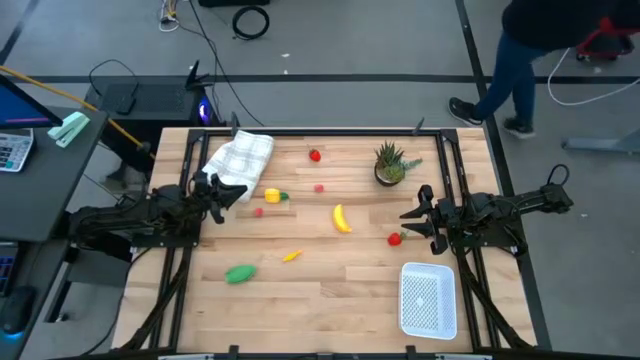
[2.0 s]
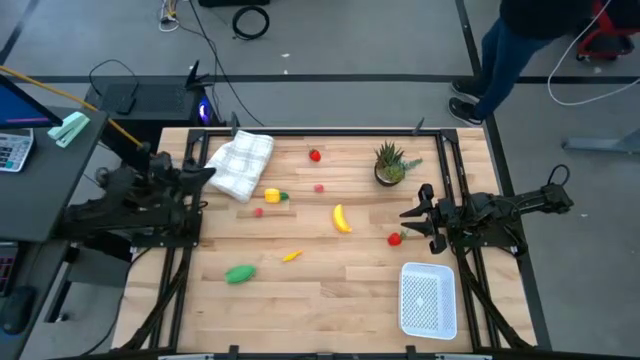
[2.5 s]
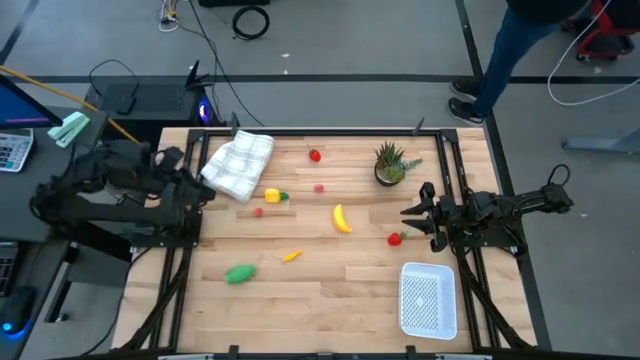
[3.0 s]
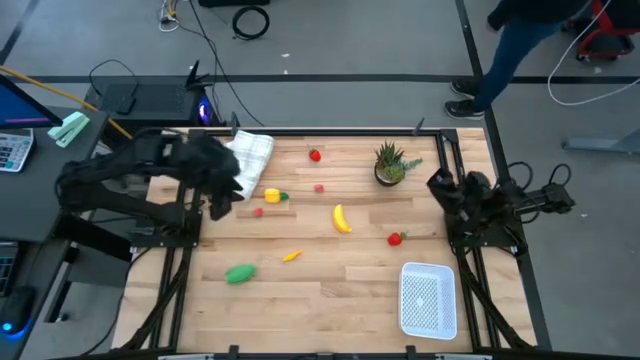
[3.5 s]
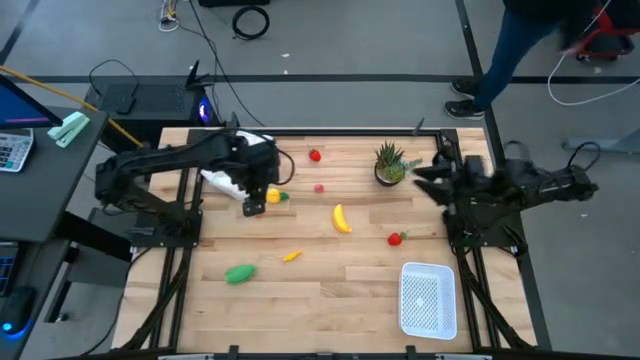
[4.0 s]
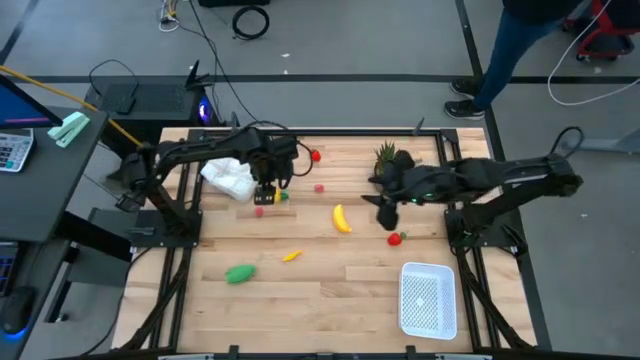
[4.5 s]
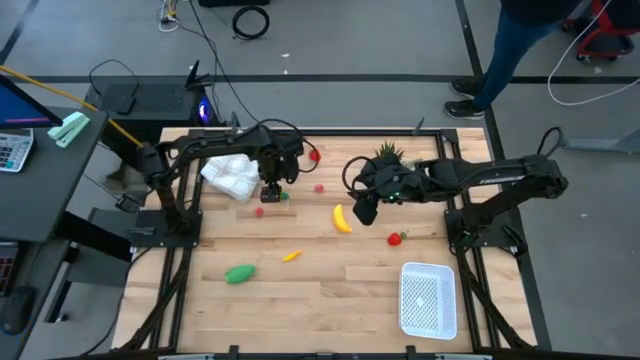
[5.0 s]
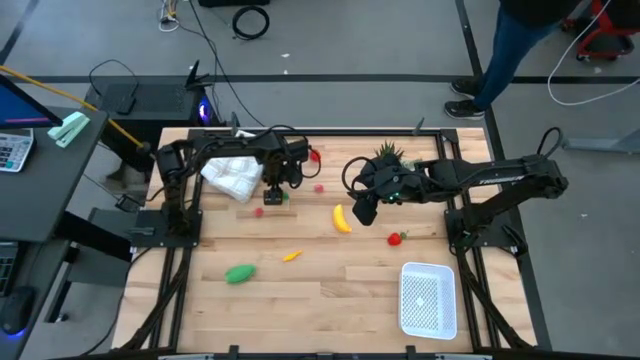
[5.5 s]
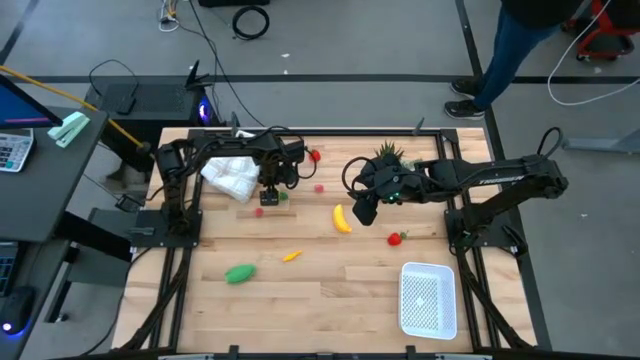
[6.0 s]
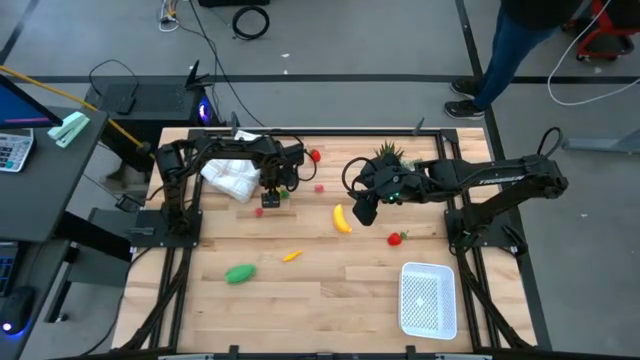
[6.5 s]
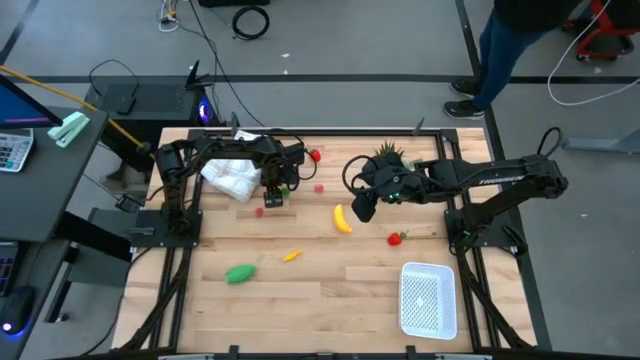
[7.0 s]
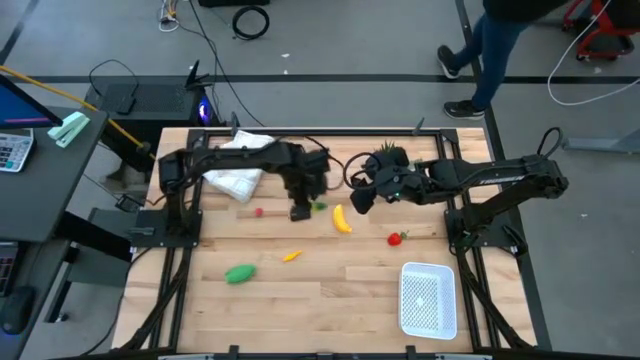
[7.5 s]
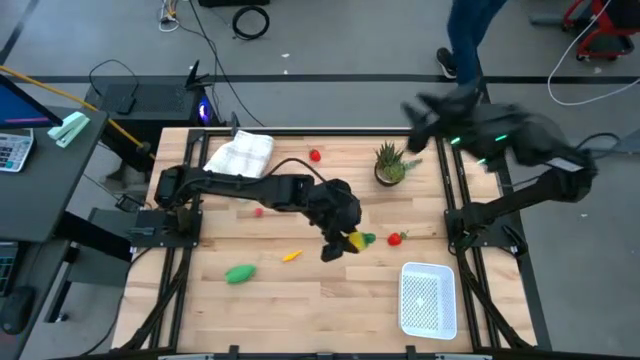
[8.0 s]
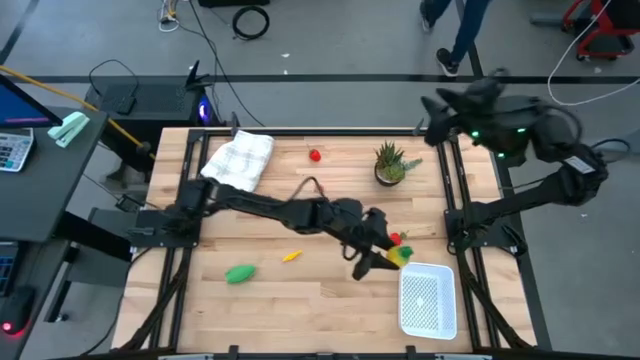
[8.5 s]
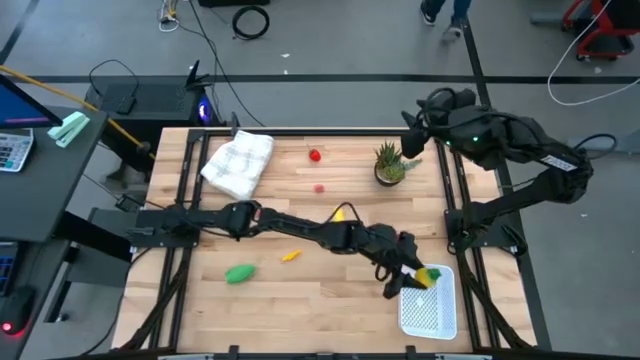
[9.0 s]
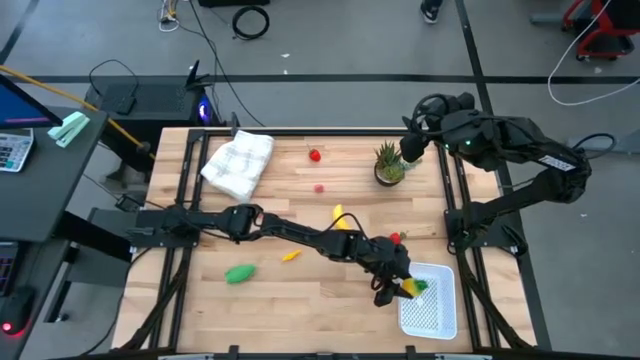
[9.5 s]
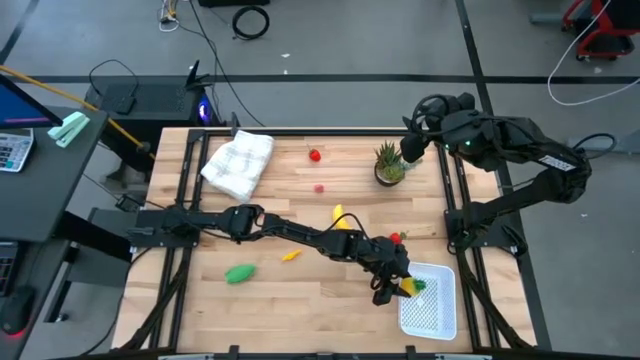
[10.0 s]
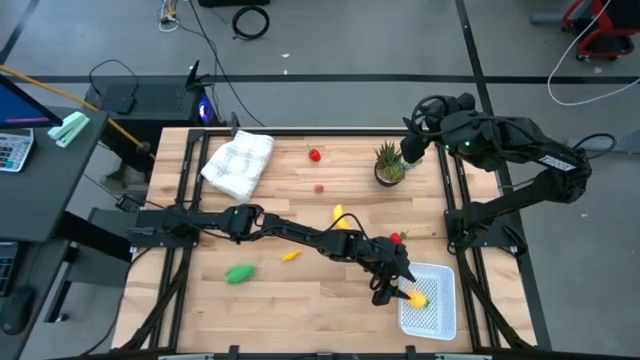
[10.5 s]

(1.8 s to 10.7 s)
Task: Pick and placing Produce into tupperware
Put the pineapple into the white bin

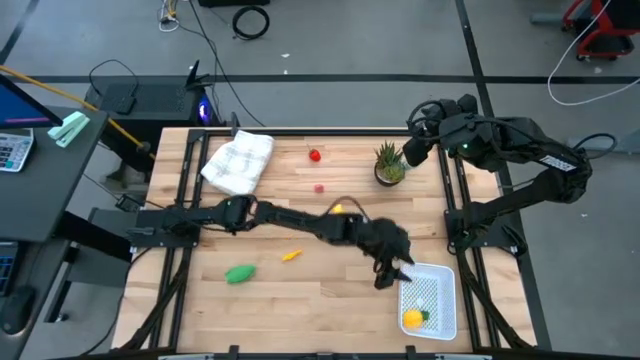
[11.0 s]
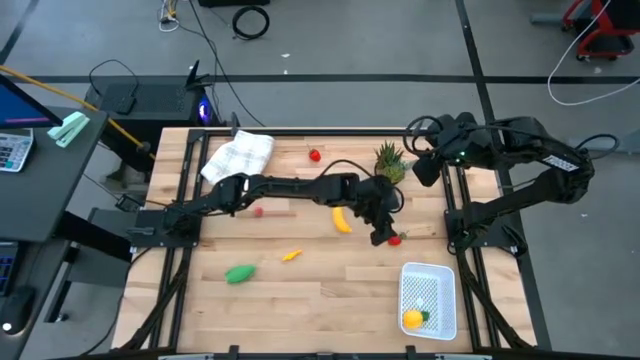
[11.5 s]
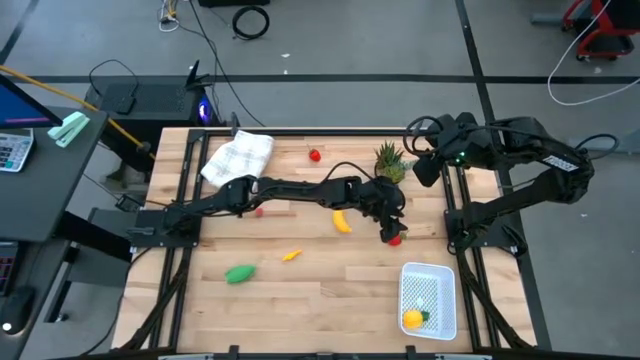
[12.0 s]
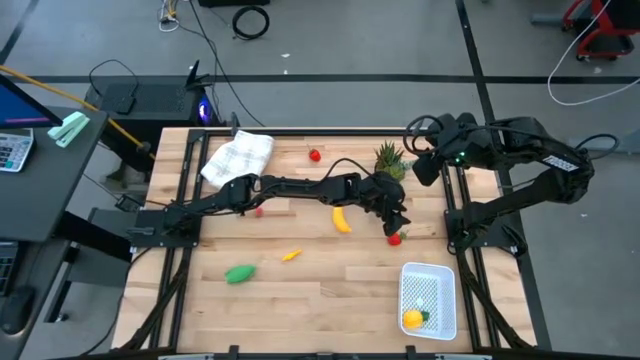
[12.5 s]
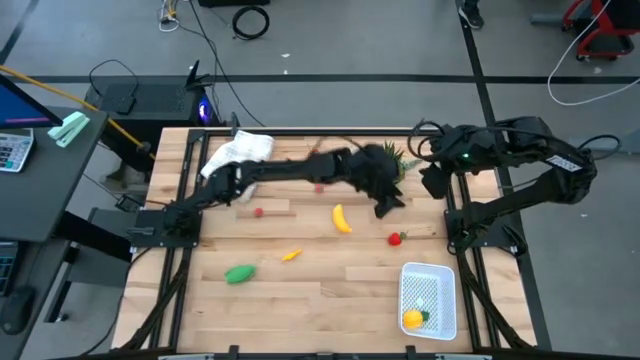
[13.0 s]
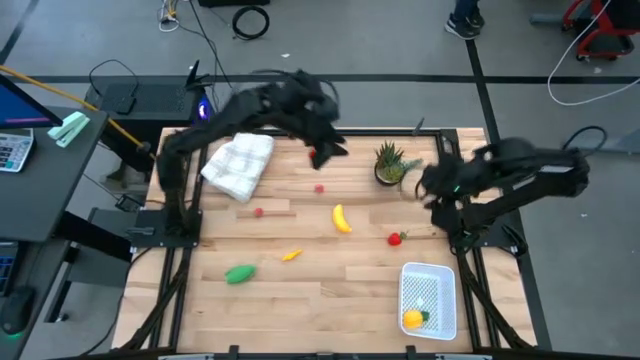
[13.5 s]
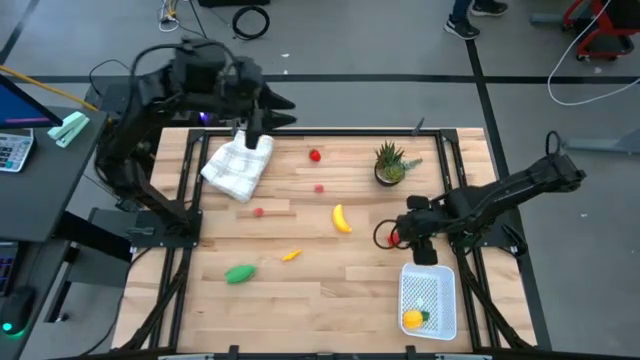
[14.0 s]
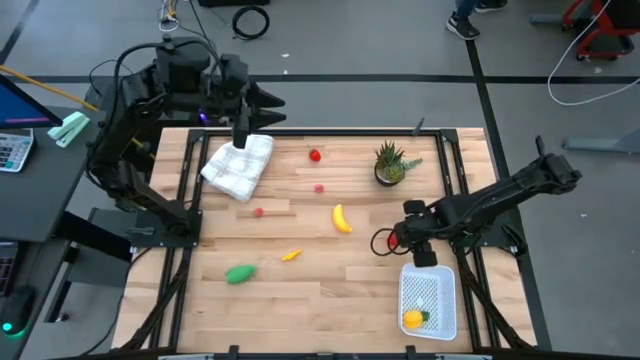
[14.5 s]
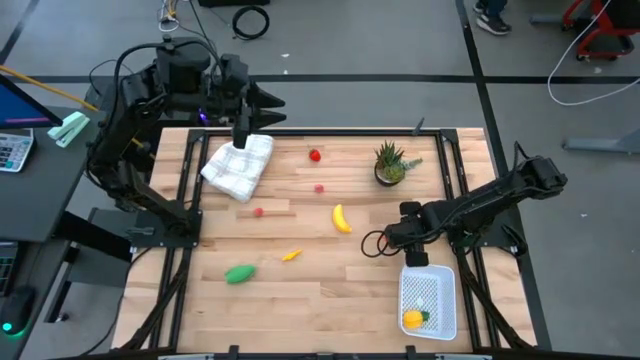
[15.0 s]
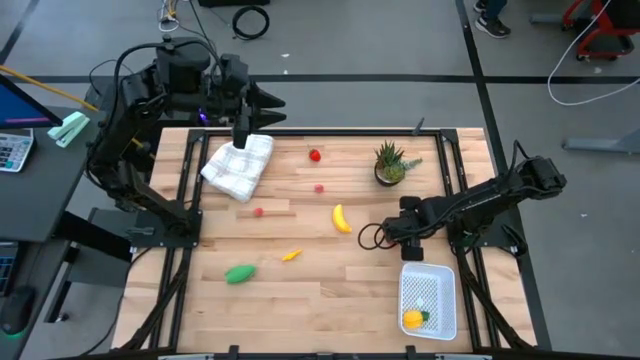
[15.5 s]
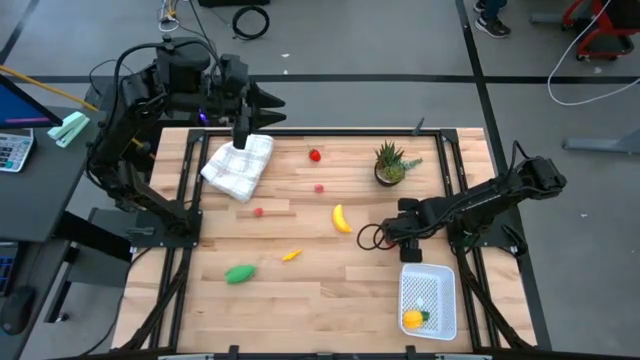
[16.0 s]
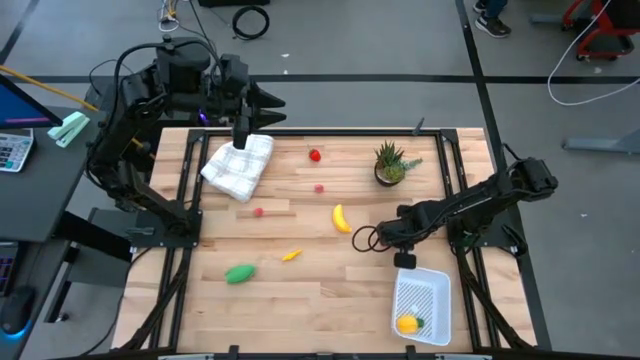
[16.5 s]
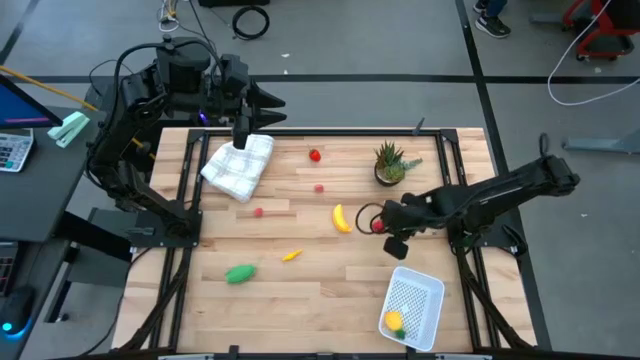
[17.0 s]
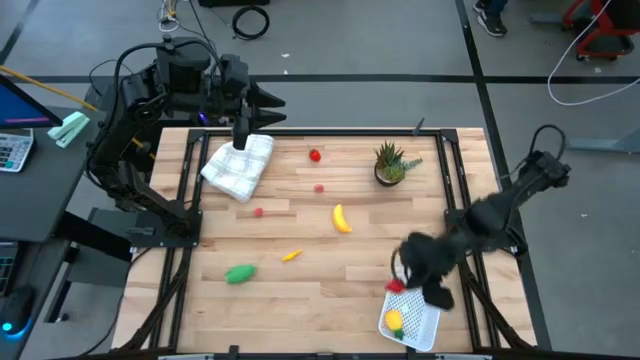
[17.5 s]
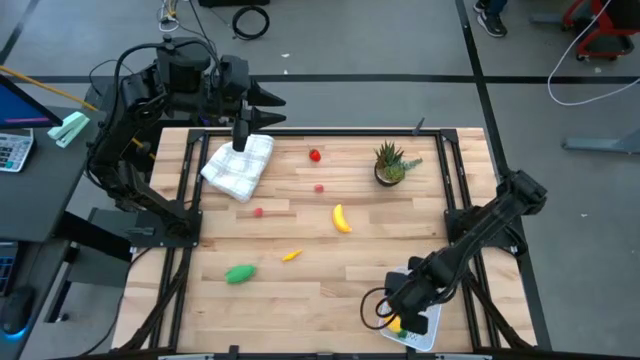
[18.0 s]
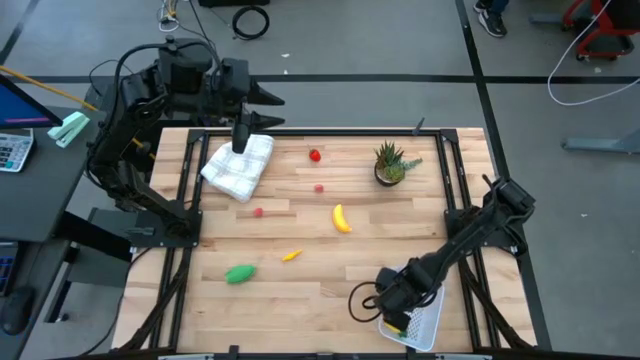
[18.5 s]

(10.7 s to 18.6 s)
Put the bottom strawberry into the white bin

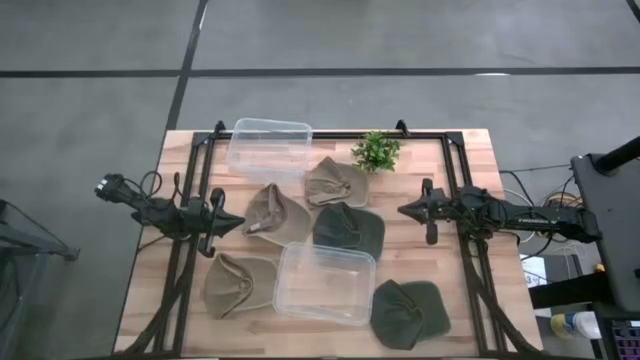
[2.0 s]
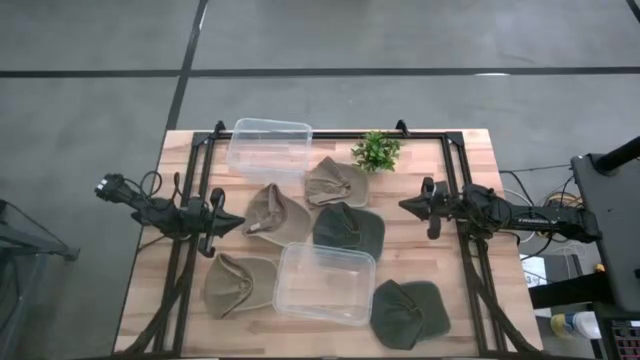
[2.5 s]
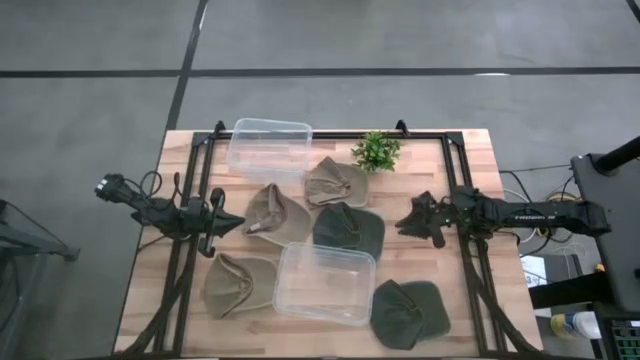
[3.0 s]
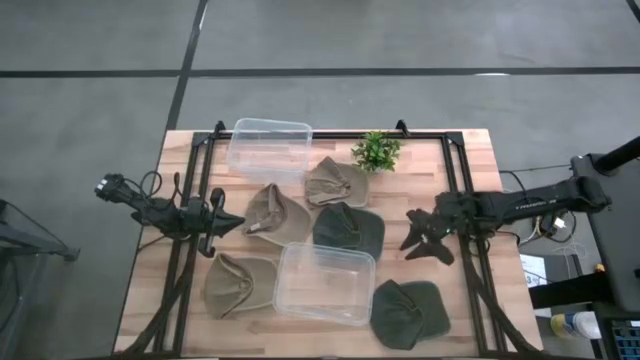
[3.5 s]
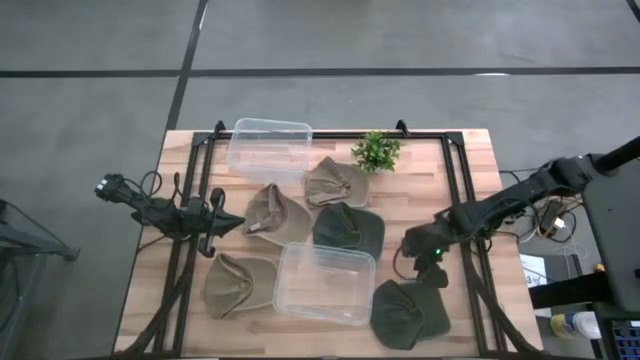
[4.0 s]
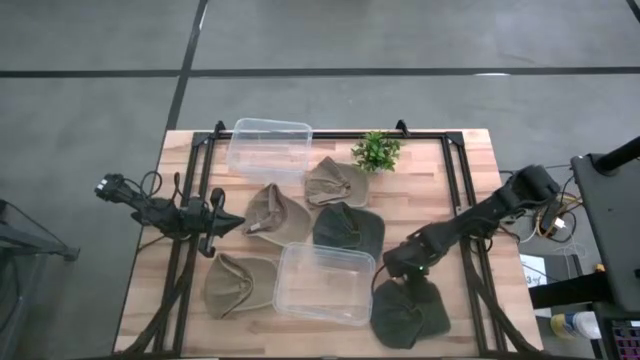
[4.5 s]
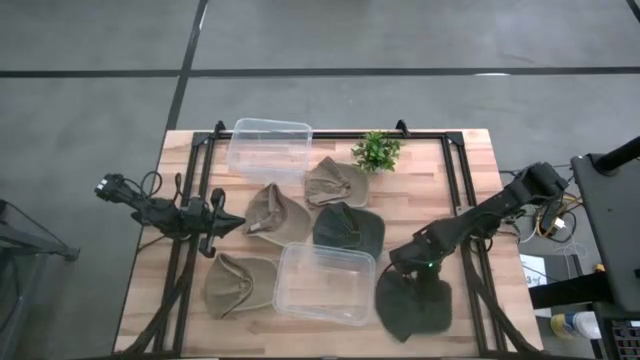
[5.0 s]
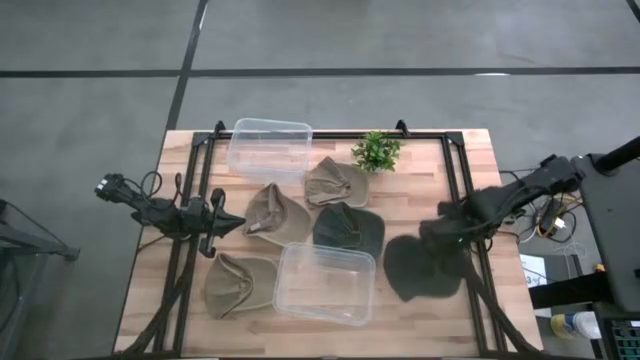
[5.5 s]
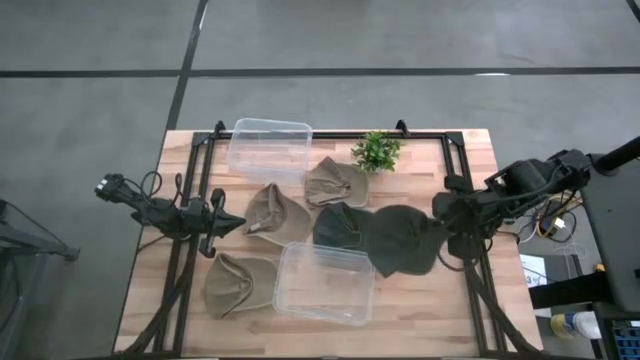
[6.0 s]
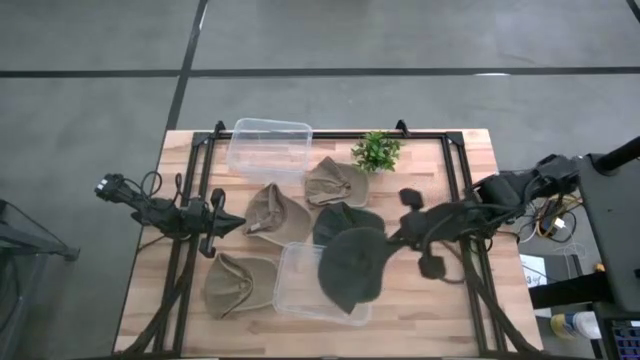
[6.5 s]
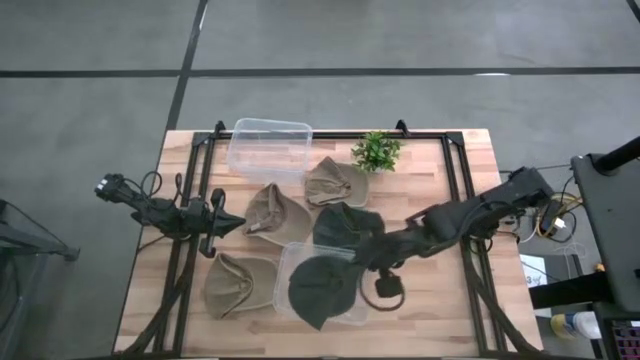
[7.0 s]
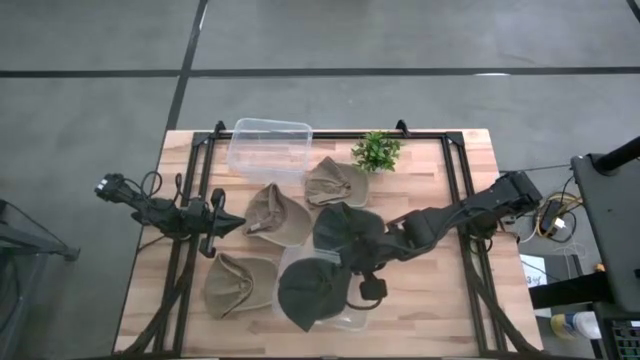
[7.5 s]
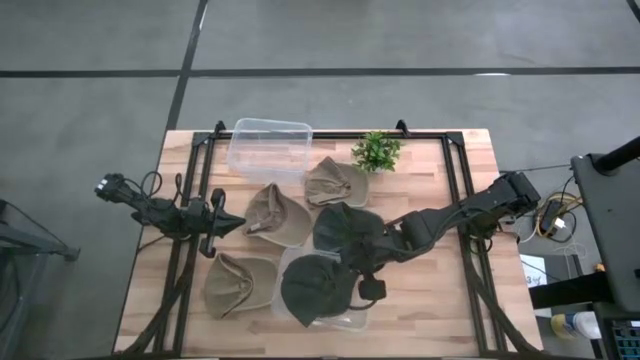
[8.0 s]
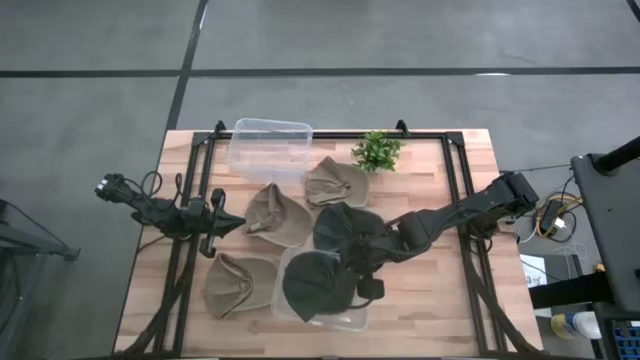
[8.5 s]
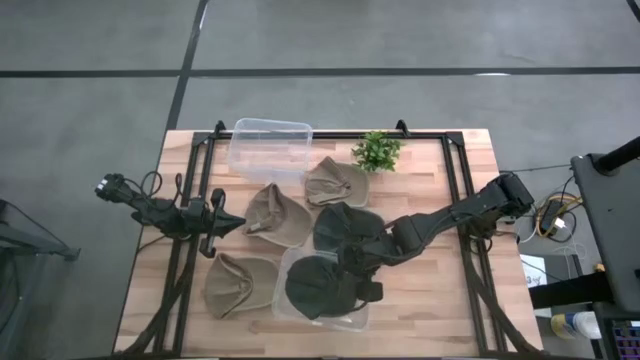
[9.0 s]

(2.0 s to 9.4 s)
Task: Pick & Place hat
Put the bottom gray cap into the bottom transparent bin
